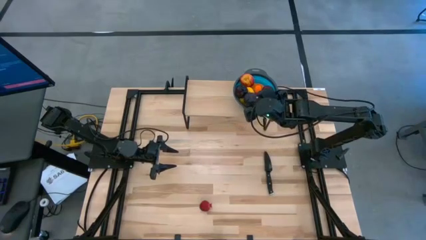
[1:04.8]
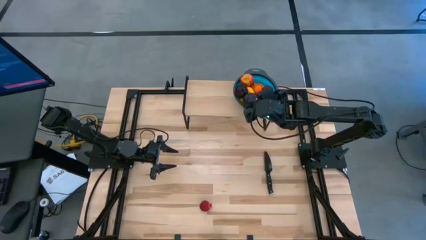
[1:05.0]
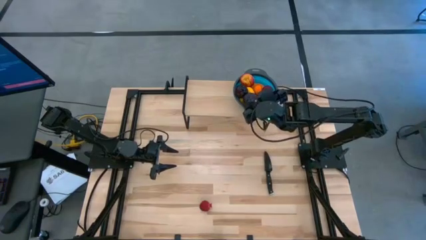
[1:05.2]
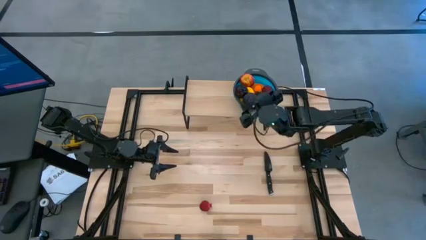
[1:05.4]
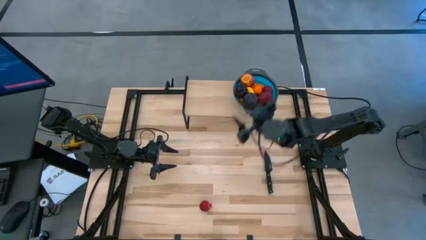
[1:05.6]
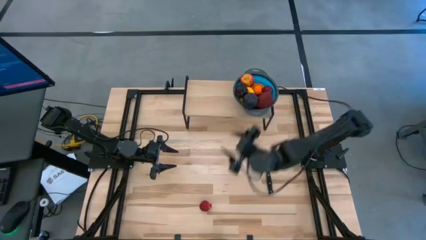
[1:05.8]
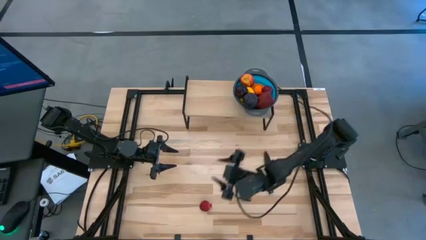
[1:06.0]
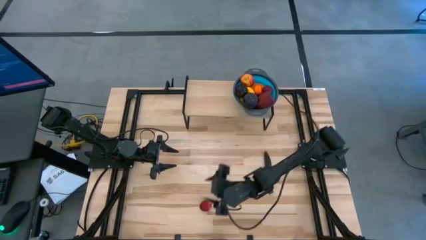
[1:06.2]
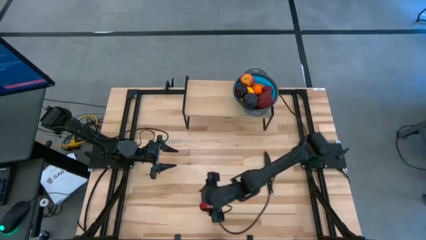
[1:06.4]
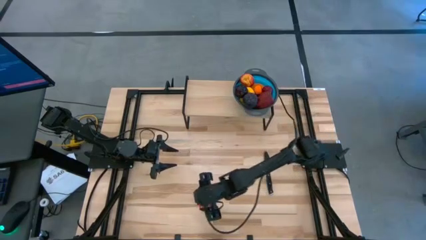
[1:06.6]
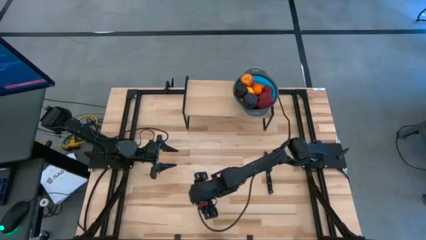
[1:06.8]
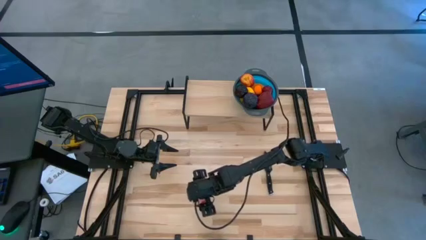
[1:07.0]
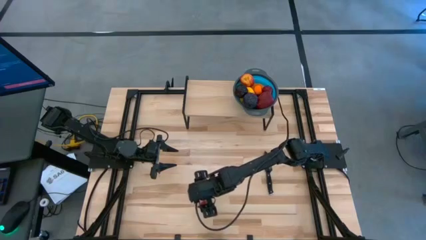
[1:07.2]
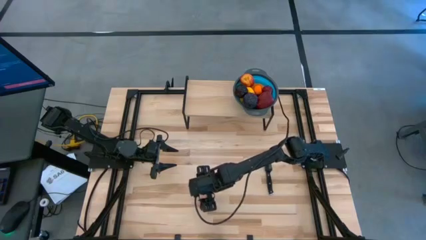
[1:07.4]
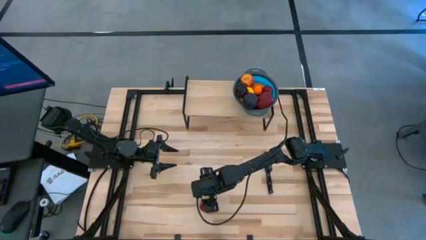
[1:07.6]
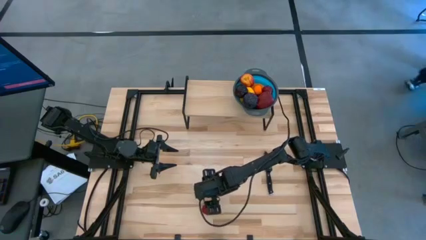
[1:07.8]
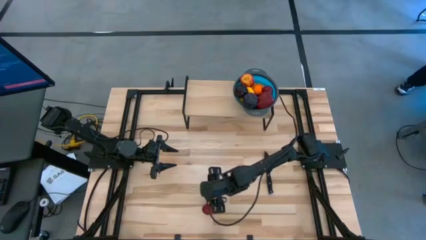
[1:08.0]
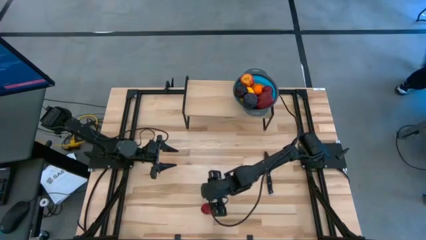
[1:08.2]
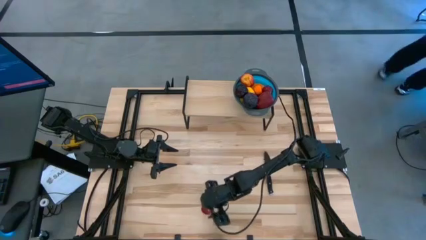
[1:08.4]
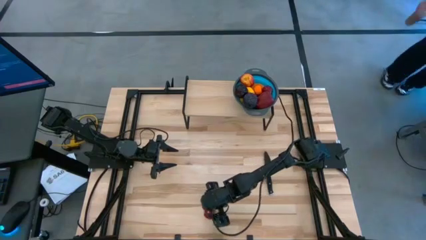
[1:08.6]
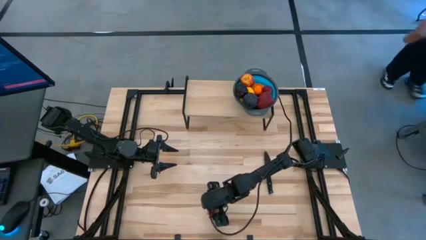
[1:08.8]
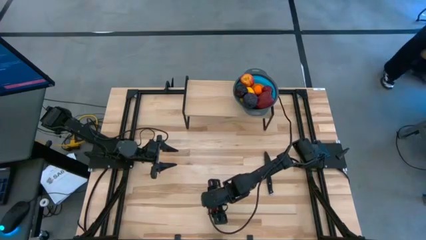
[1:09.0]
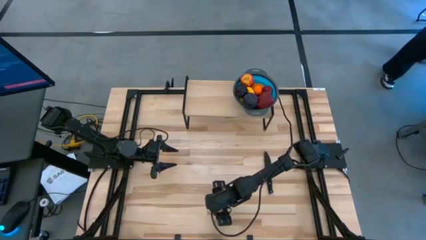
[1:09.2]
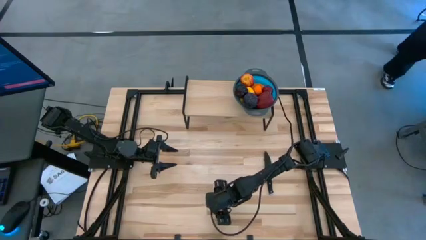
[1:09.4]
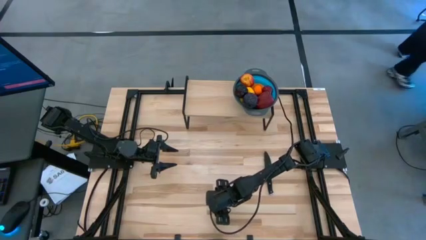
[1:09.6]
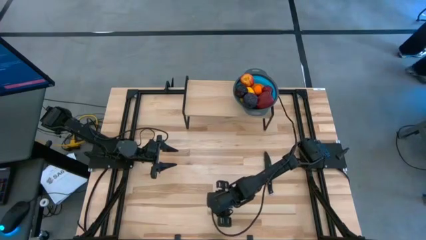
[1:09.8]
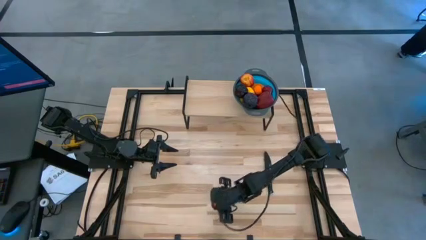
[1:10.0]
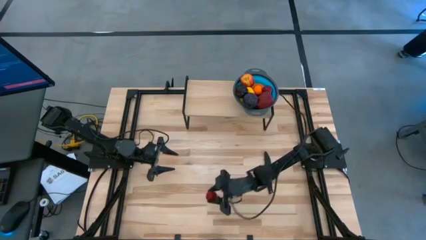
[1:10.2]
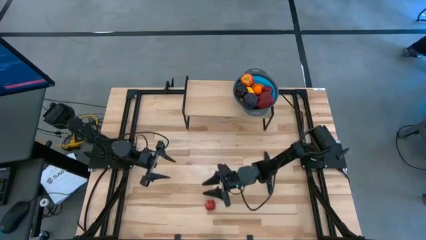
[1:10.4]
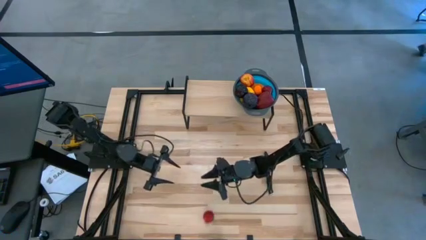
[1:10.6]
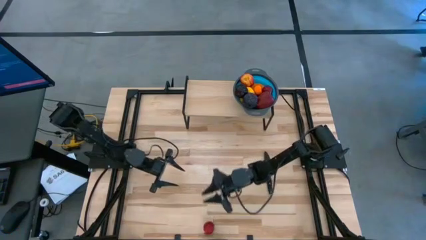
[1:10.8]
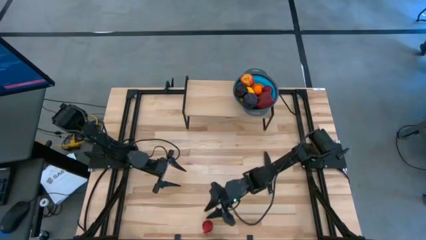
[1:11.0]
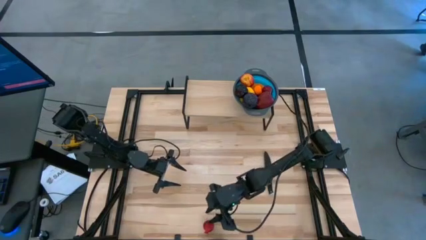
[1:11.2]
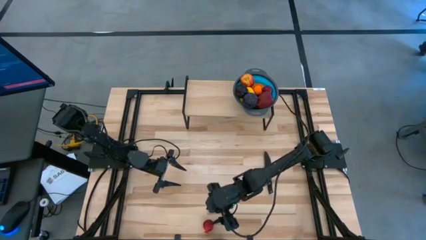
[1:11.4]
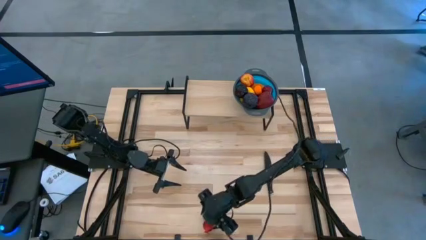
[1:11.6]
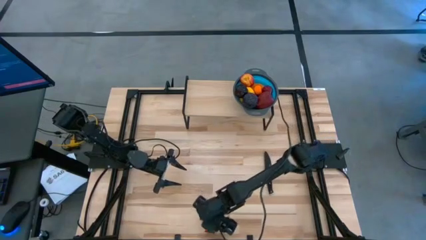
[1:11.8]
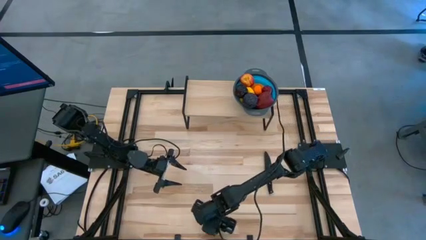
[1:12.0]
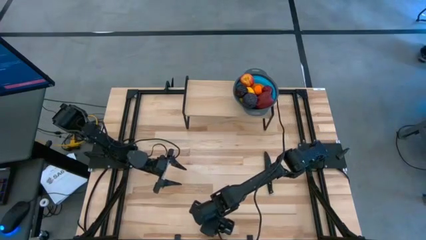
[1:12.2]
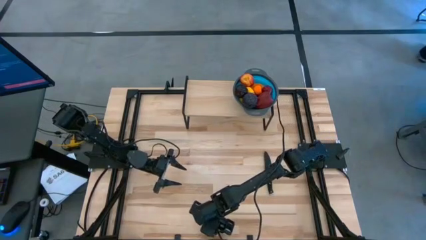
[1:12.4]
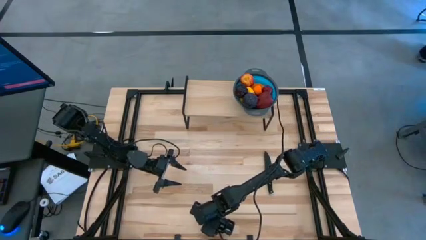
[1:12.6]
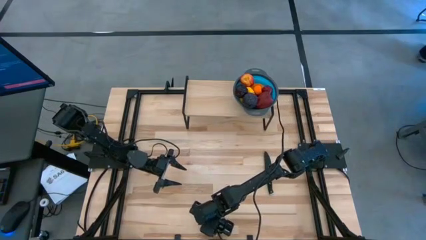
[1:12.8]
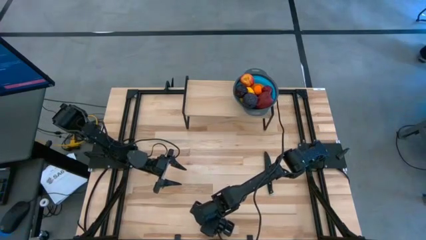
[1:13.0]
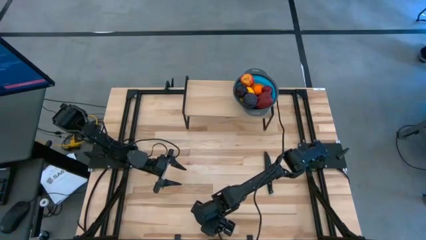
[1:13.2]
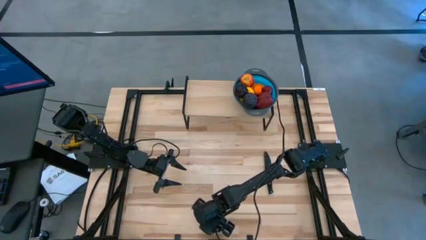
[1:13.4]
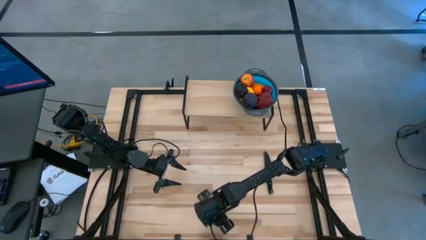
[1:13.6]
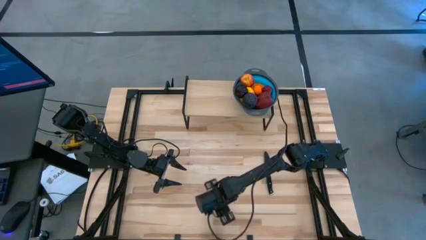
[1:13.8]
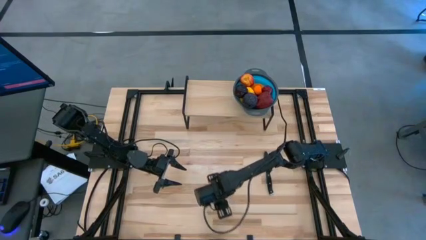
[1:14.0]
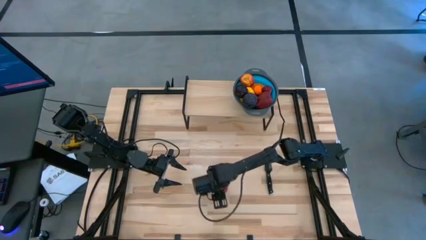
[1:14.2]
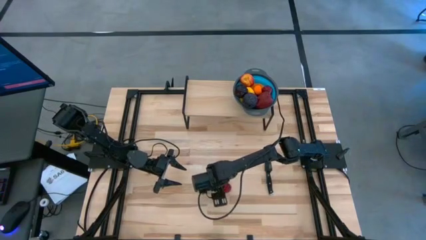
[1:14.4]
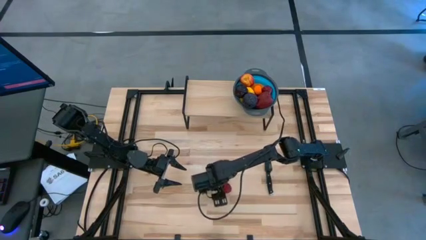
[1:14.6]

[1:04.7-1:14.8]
Task: Pick & Place Fruit
Put the pomegranate into the strainer bowl

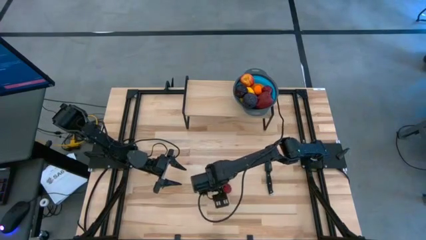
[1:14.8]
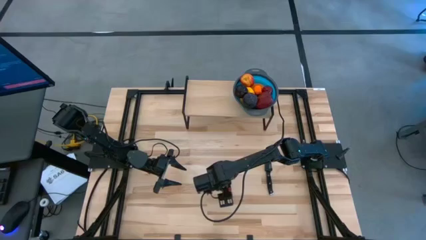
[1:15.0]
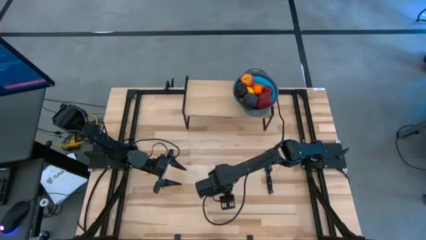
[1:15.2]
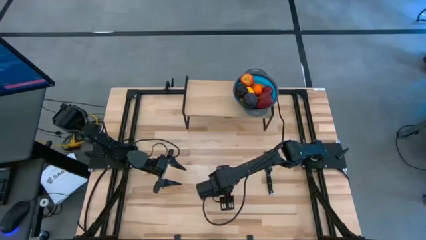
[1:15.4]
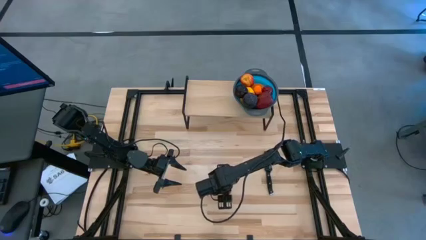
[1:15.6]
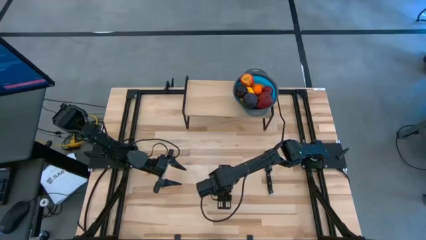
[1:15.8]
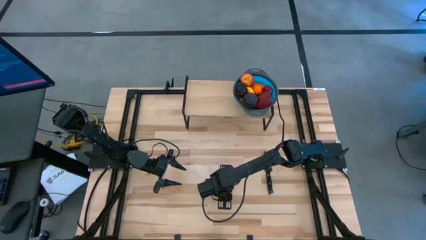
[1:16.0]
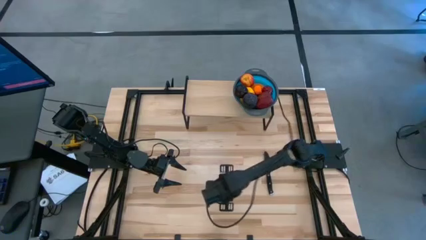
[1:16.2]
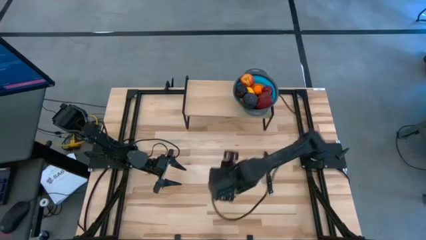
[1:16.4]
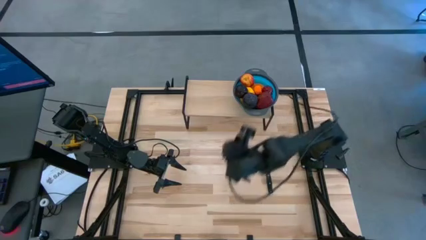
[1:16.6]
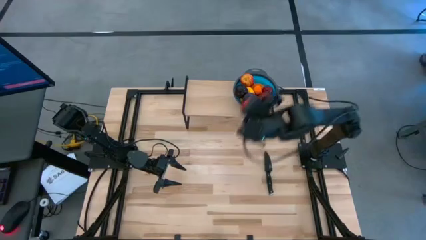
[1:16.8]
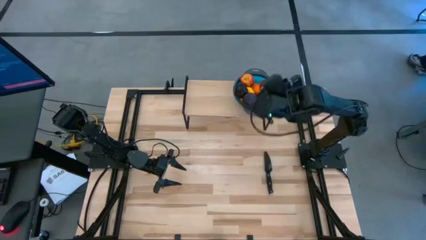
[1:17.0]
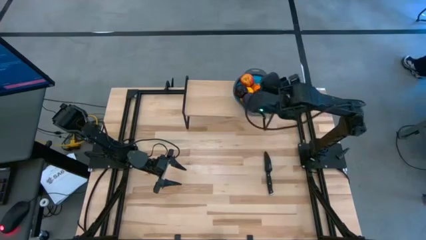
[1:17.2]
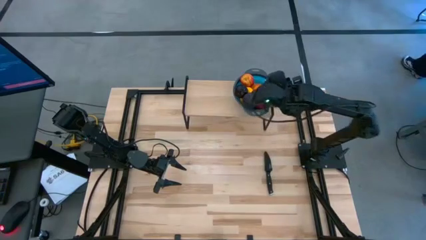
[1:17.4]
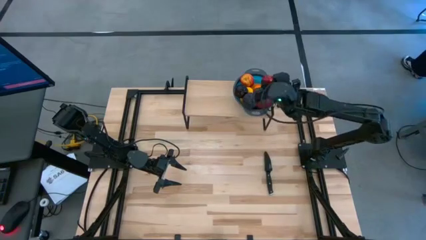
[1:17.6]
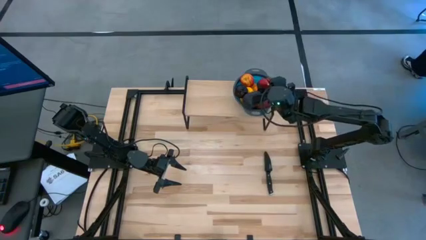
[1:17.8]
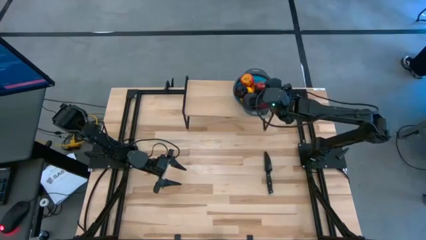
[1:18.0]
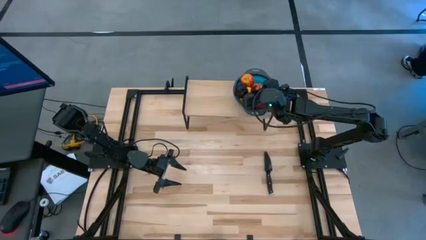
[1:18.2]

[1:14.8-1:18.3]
Put the pomegranate into the strainer bowl

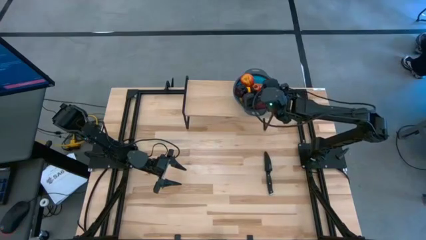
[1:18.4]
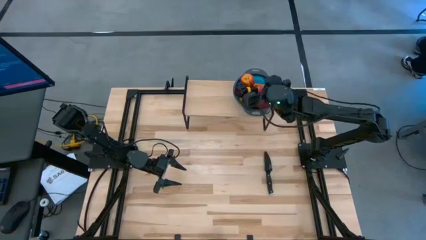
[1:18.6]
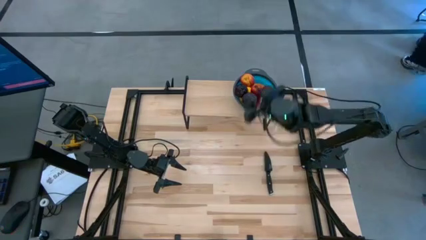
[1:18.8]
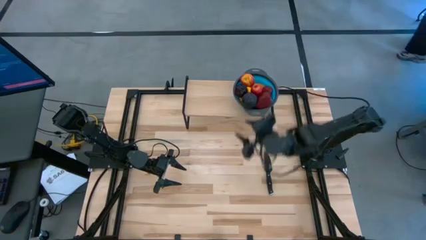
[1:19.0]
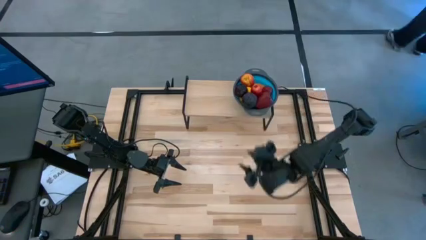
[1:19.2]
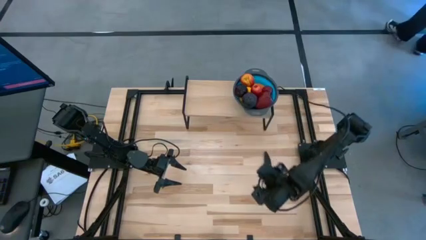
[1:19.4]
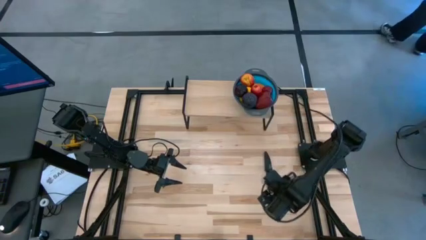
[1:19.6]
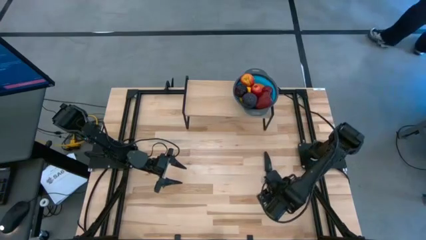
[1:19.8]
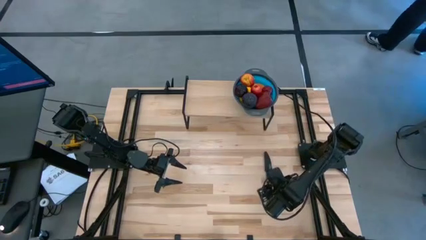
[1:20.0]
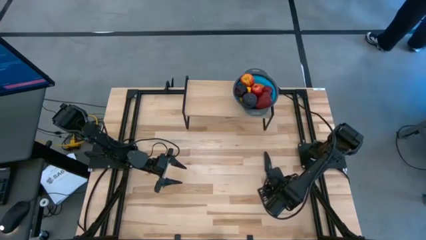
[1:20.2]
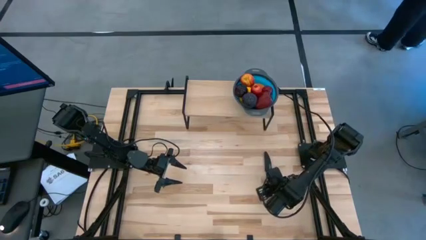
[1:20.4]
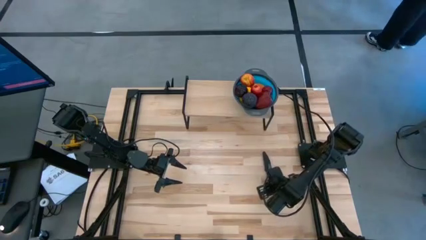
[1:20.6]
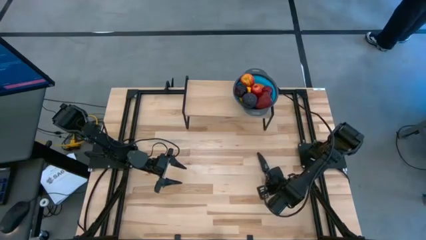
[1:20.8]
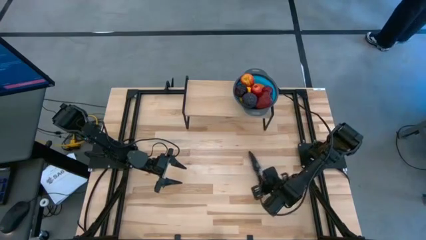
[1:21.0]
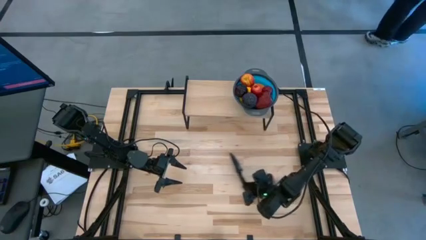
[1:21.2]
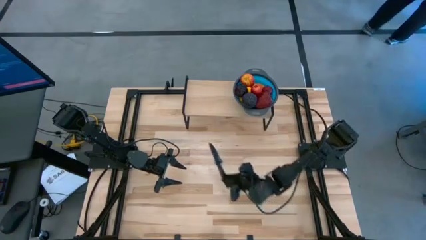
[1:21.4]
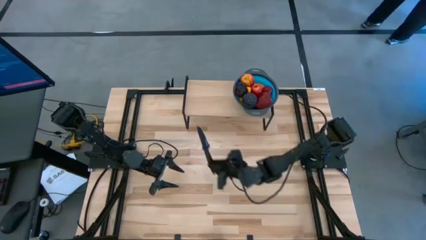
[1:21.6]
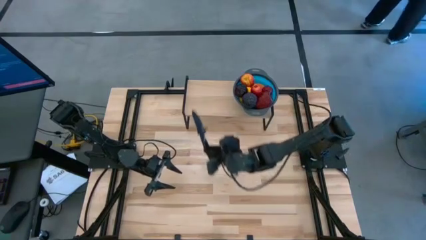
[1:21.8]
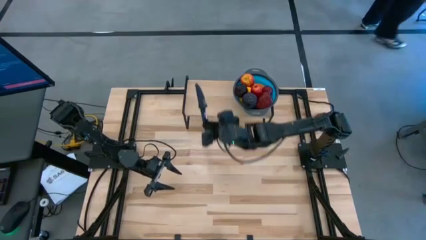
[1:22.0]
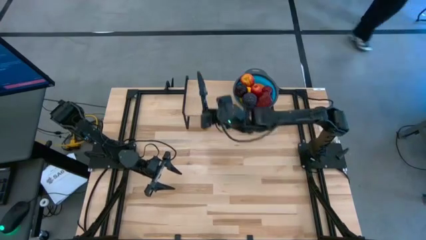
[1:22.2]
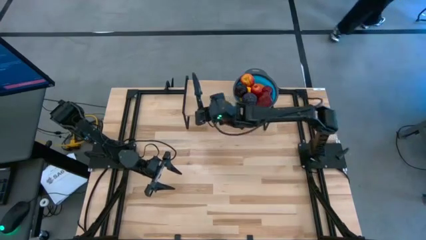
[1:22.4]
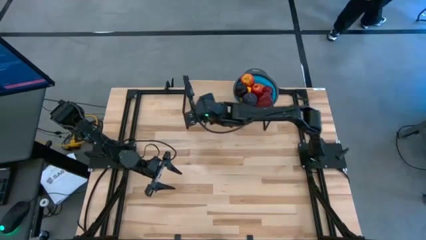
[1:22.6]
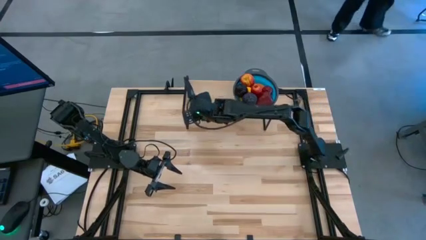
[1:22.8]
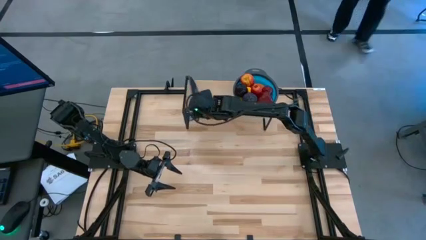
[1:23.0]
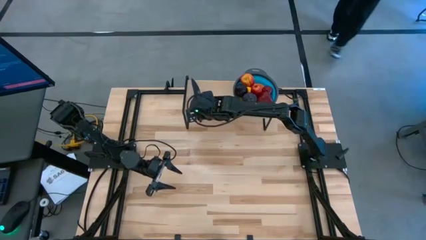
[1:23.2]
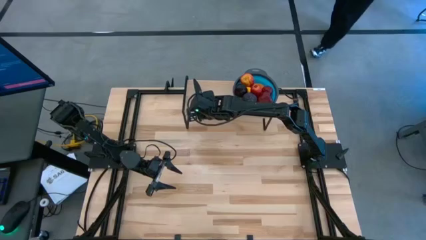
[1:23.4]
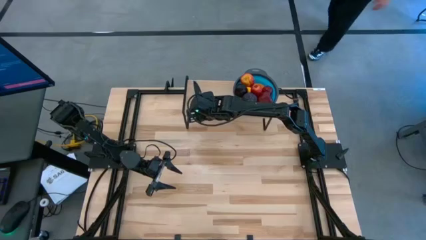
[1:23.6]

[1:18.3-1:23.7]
Put the knife on the shelf to the left of the strainer bowl
